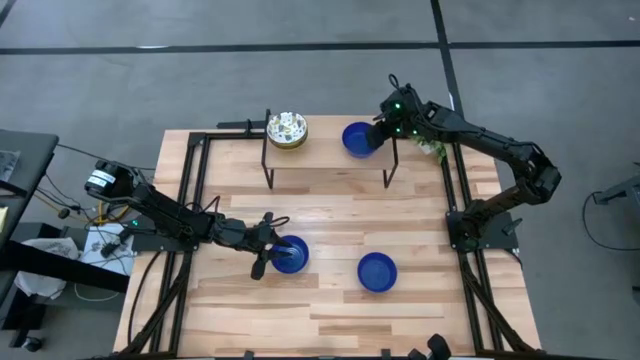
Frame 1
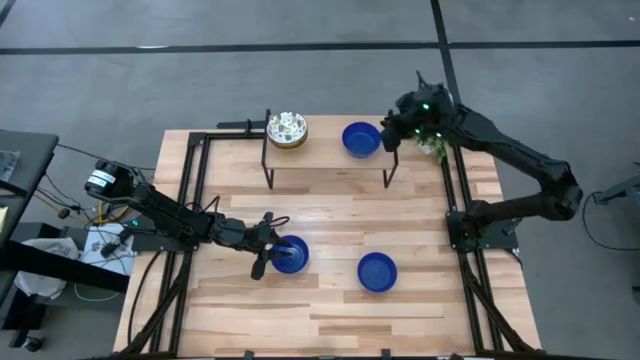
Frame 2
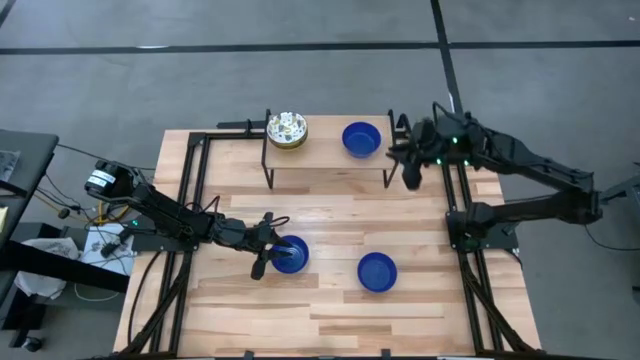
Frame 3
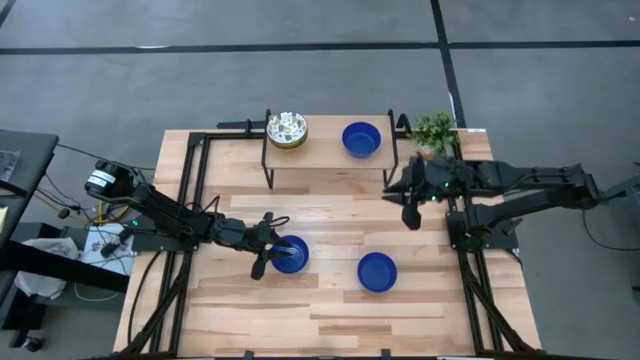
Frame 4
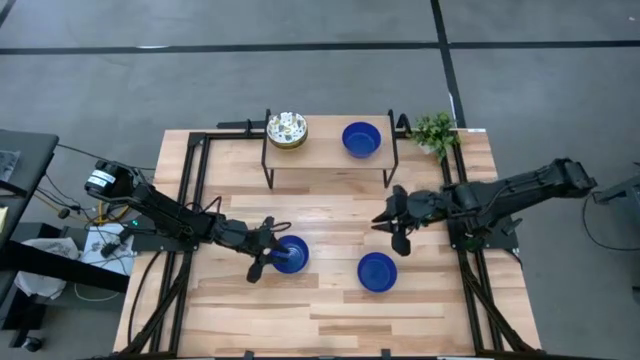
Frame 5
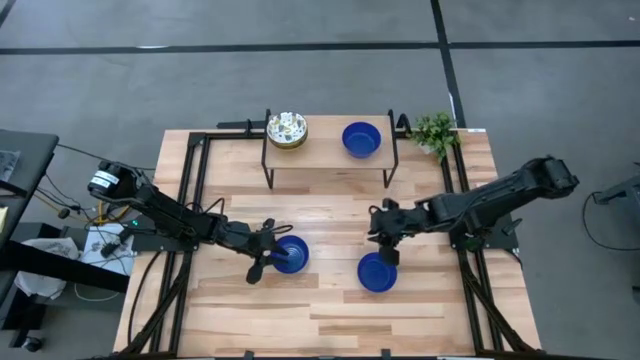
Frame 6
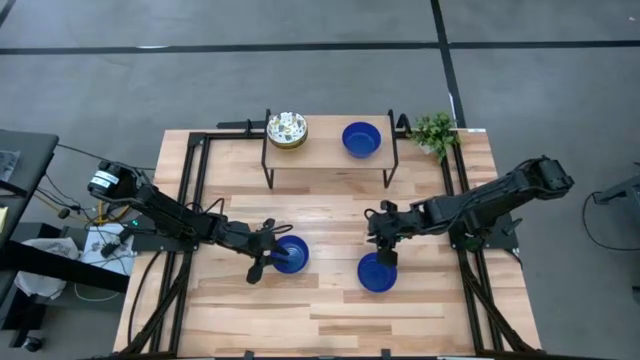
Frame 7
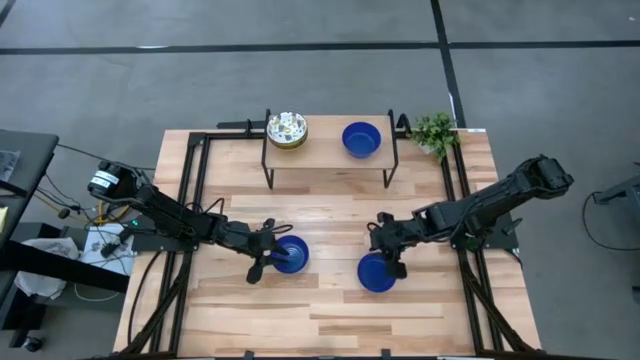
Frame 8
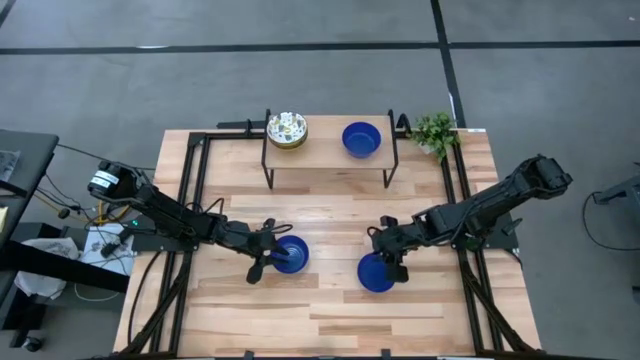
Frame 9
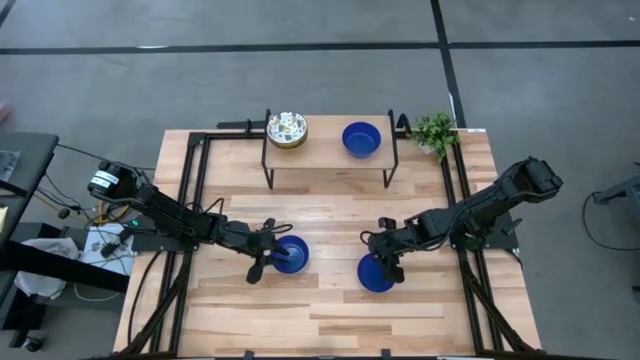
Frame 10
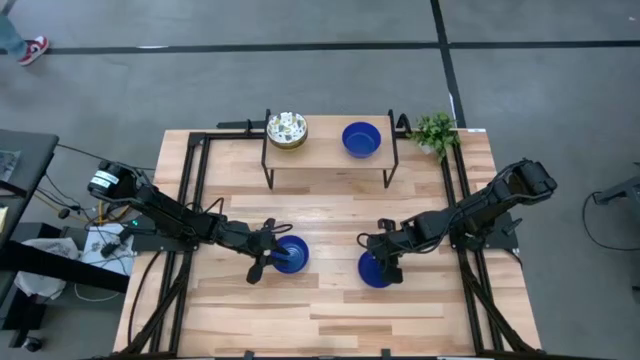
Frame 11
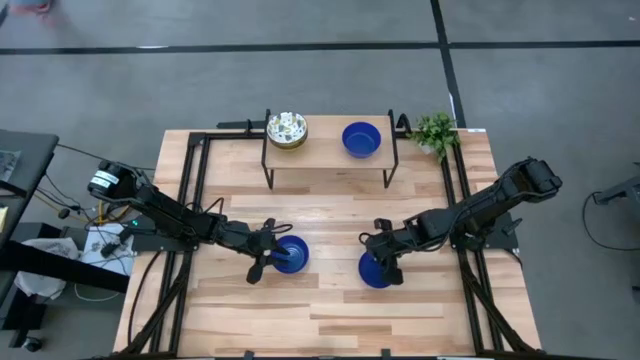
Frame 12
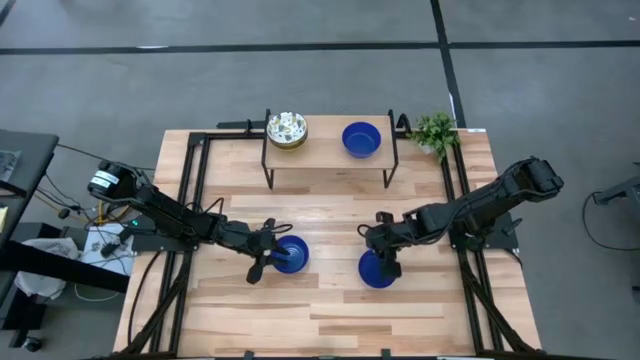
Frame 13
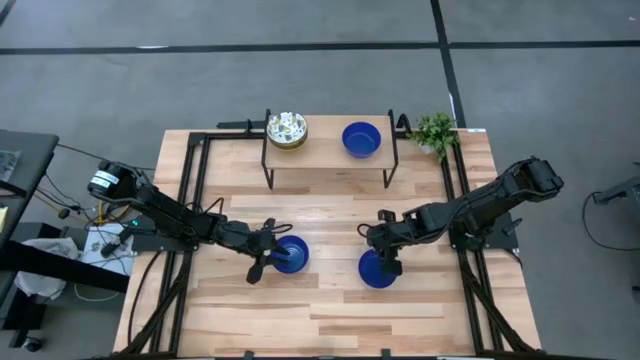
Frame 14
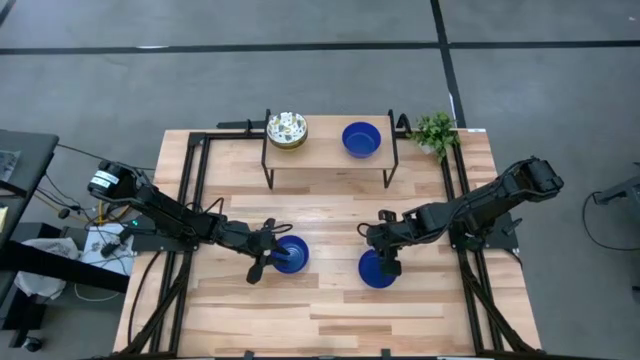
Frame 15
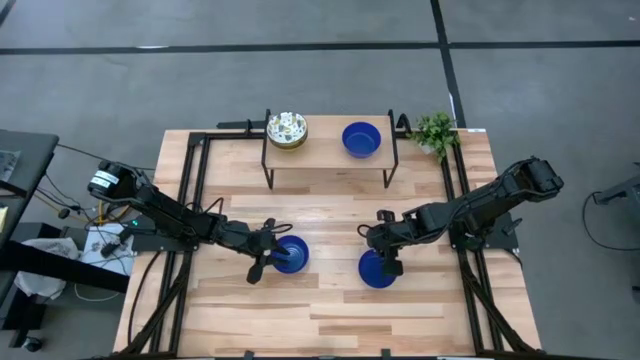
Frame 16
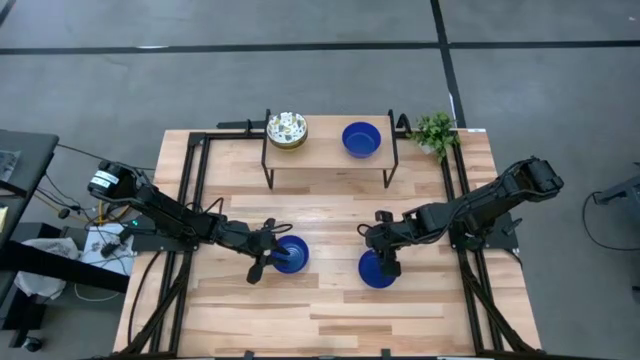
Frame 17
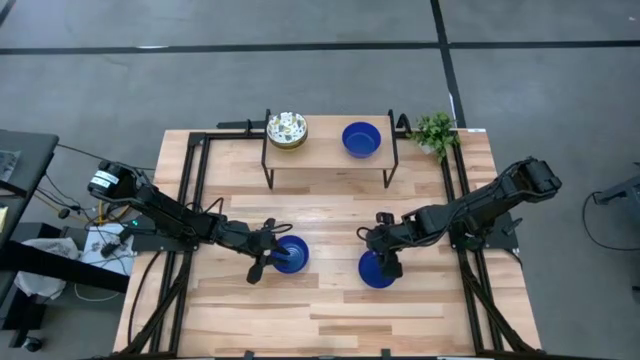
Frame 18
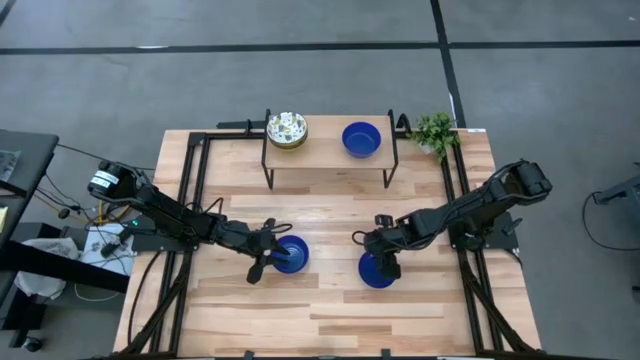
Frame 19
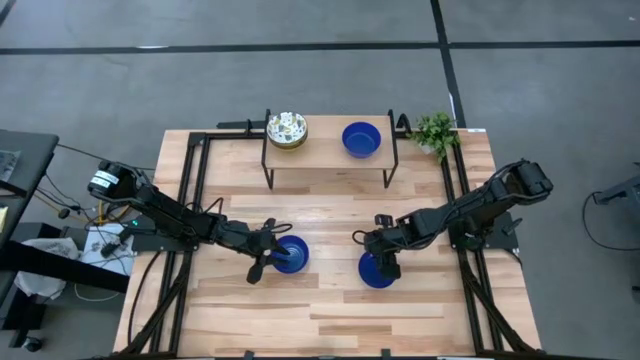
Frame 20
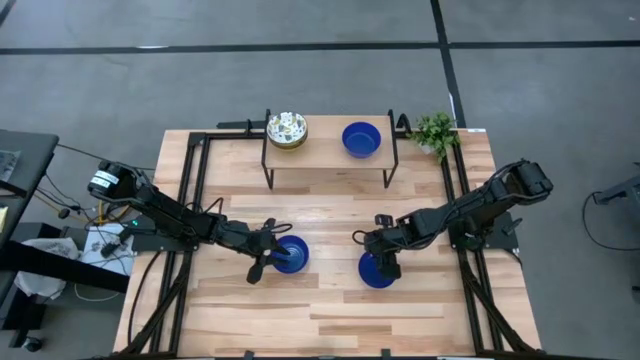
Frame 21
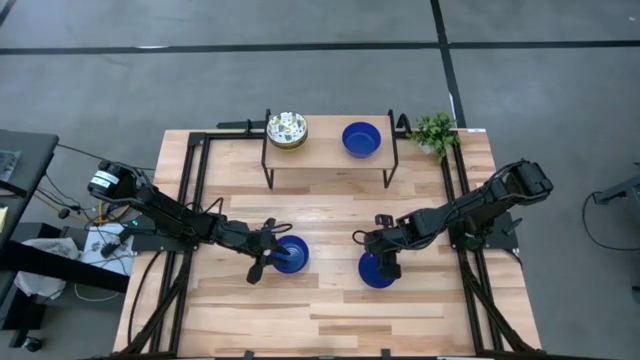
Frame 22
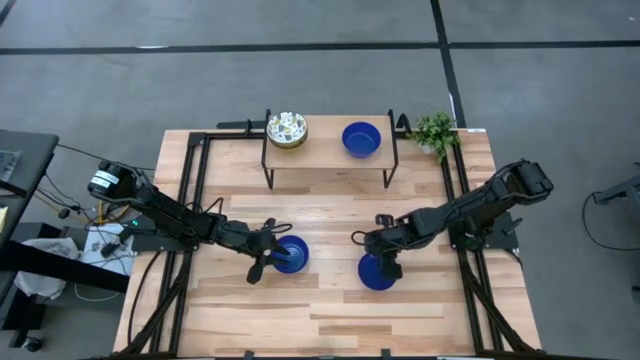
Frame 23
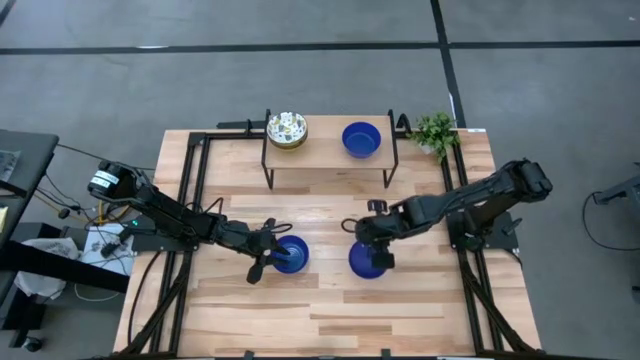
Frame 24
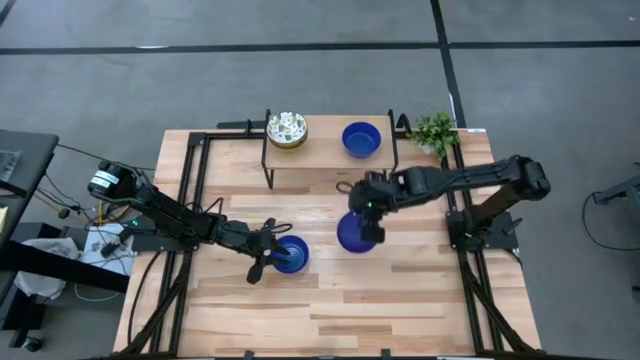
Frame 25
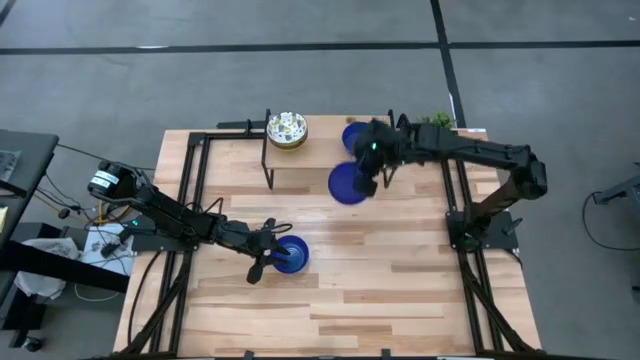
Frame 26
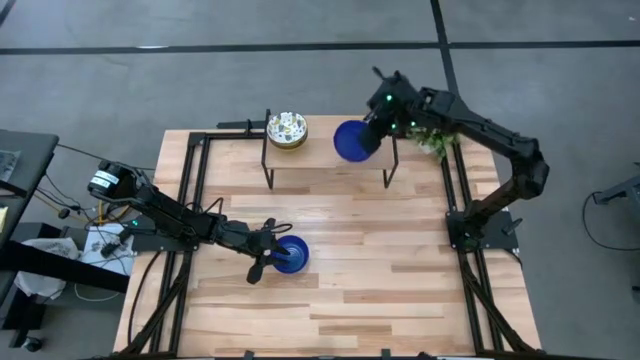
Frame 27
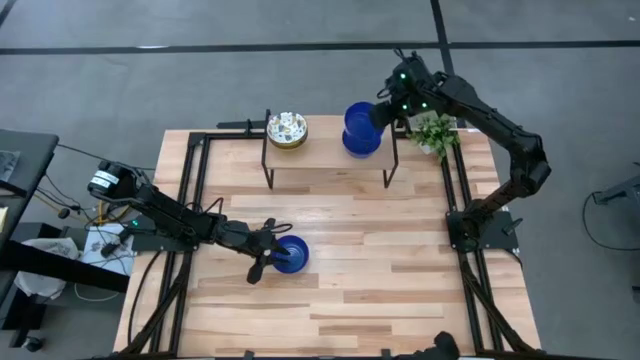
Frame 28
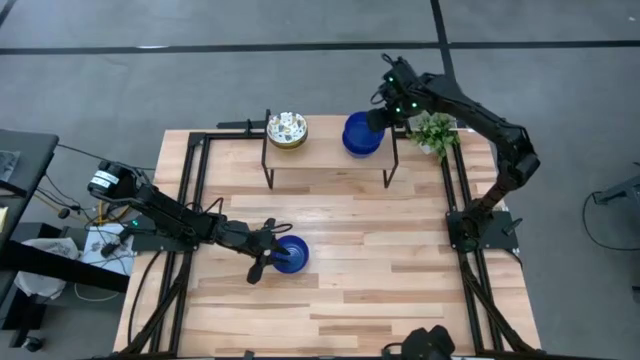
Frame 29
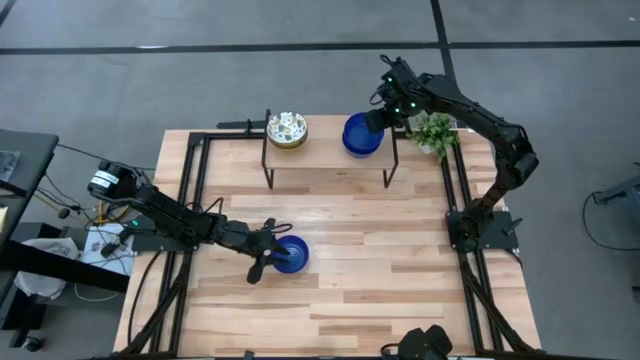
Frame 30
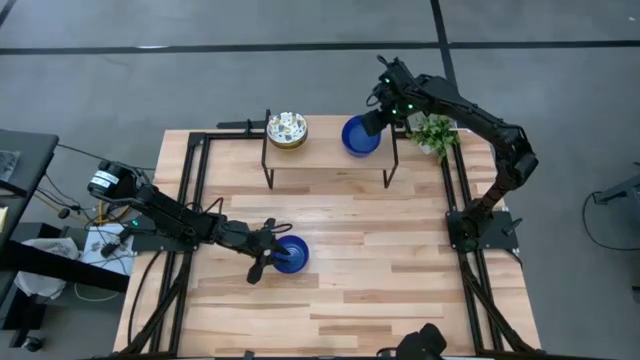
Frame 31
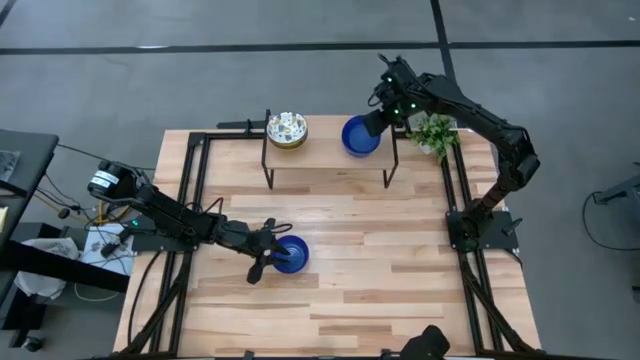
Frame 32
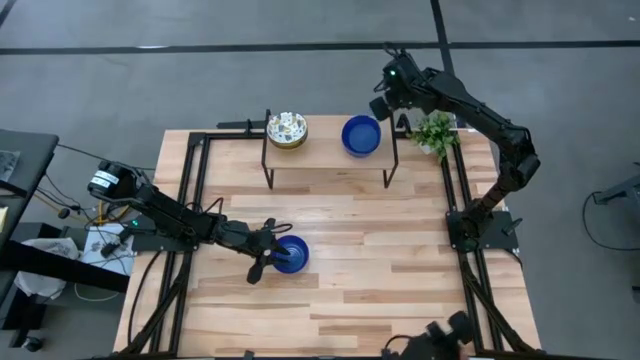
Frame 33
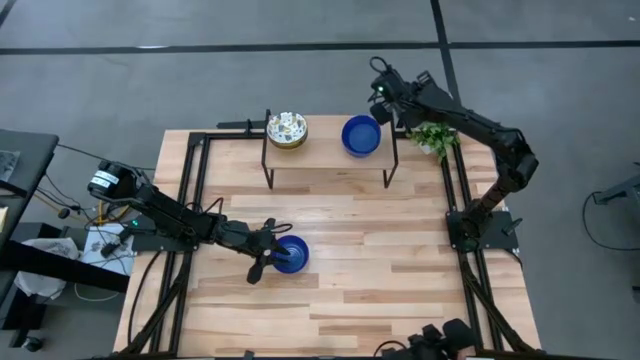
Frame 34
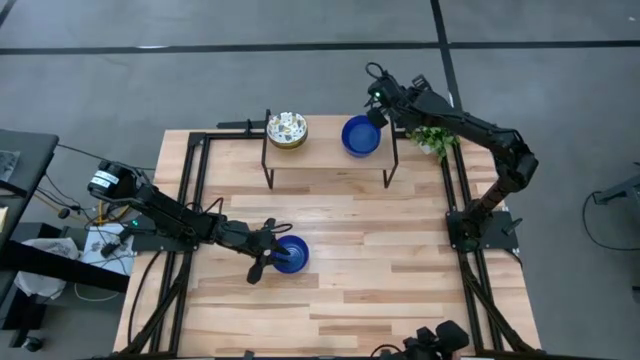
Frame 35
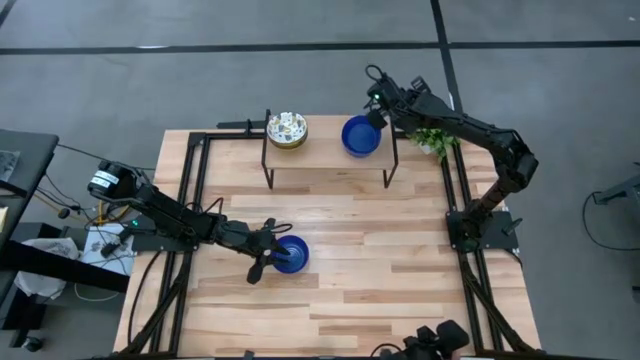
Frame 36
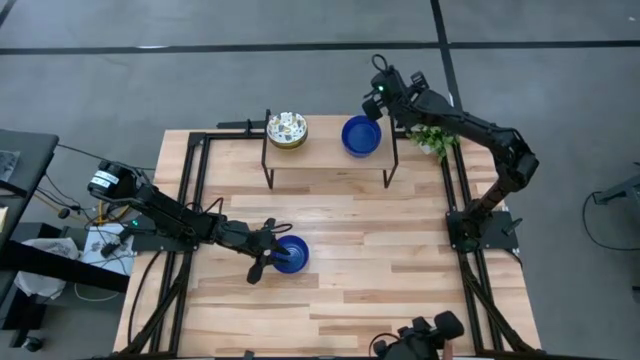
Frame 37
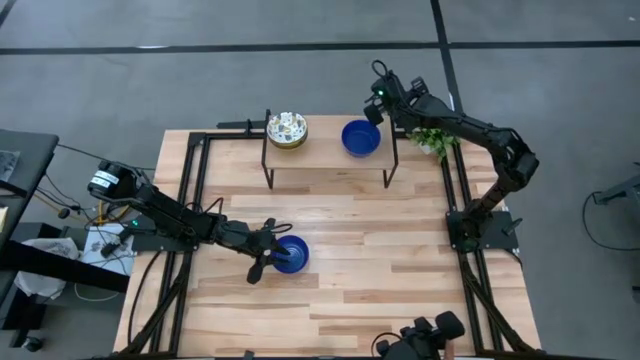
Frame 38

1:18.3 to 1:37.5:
Task: Pick & Place Mini bowls
Stack the blue bowl on the top of the blue bowl on the shelf

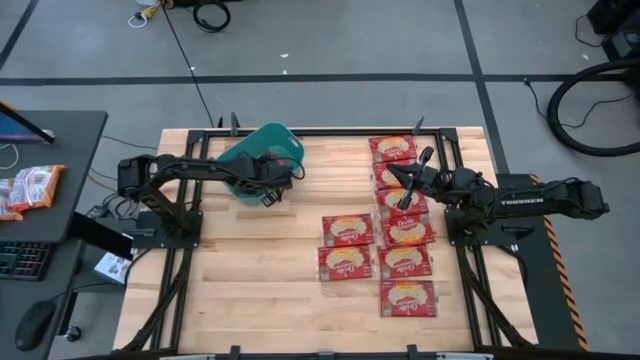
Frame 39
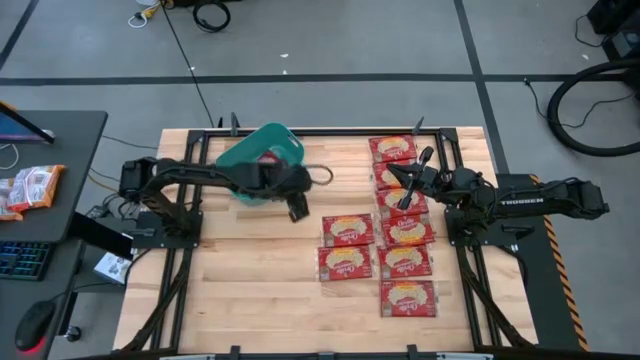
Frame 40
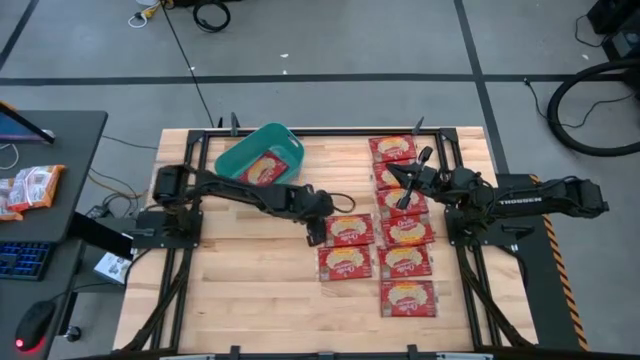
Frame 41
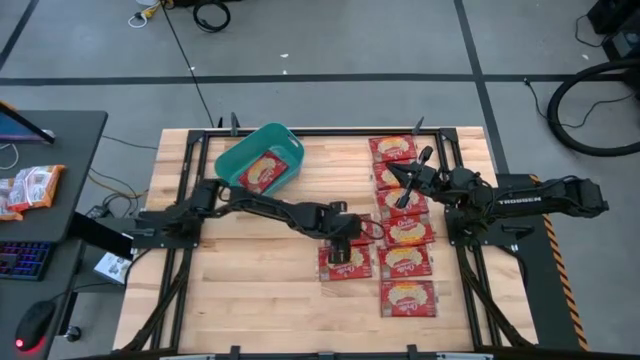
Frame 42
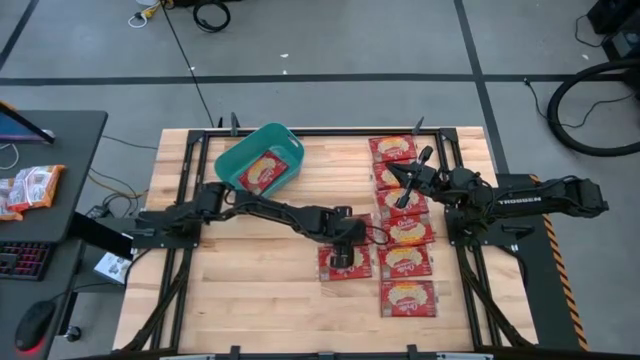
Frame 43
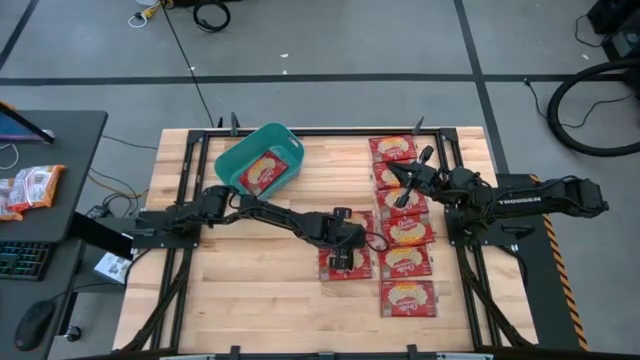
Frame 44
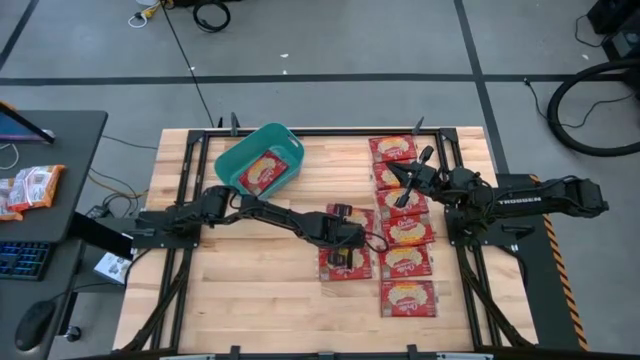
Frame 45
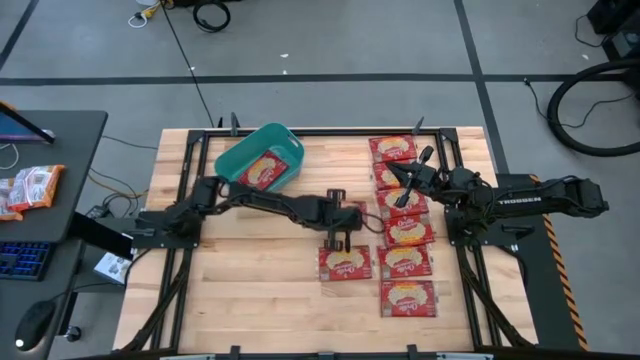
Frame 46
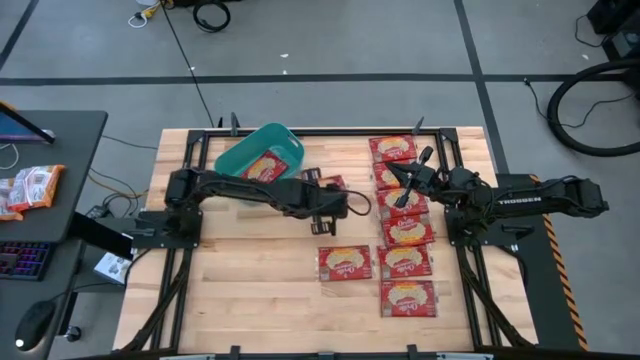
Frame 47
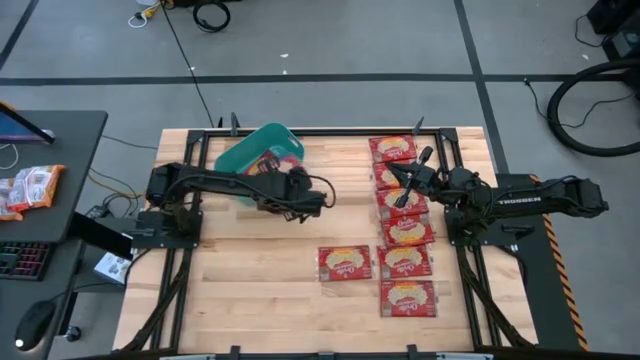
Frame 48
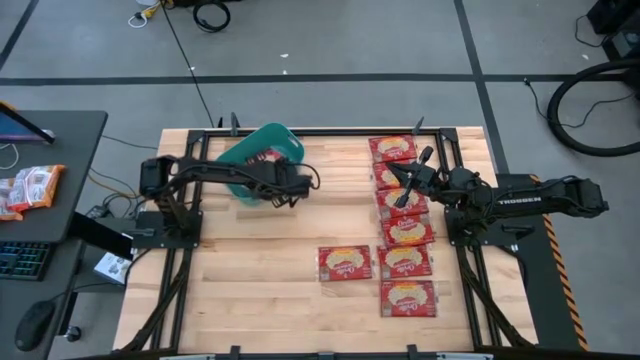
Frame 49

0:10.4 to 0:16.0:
Task: Sort popcorn bags into baskets
Put the popcorn bag into the bin
